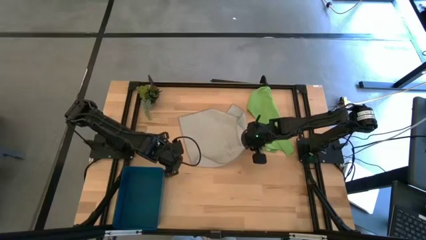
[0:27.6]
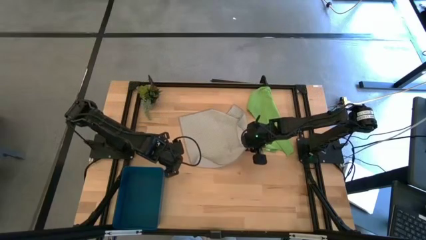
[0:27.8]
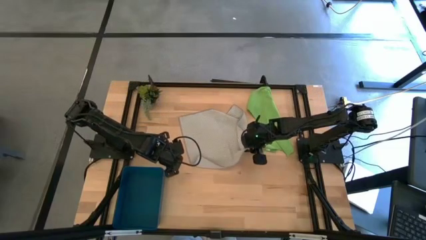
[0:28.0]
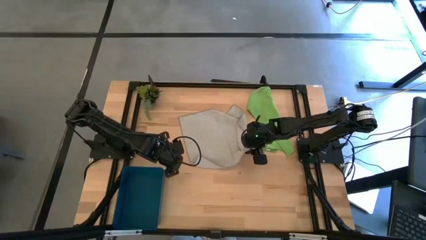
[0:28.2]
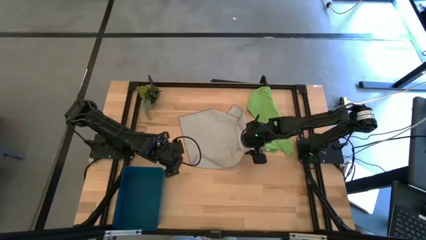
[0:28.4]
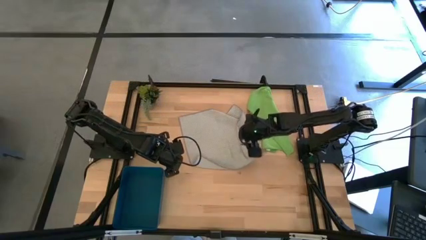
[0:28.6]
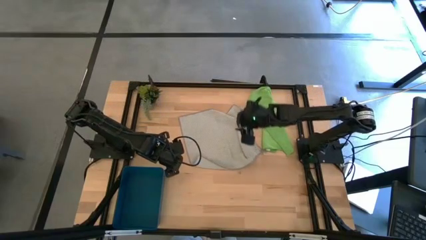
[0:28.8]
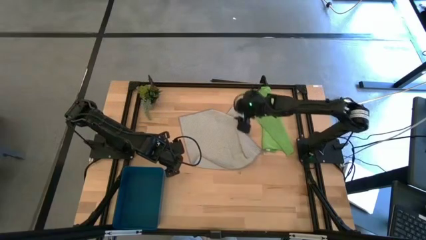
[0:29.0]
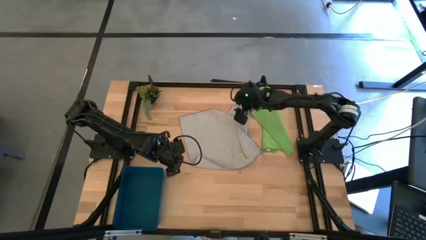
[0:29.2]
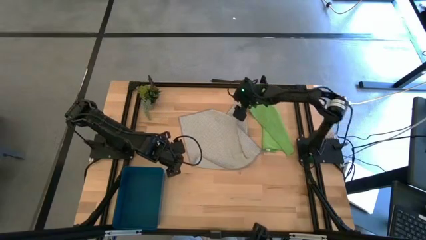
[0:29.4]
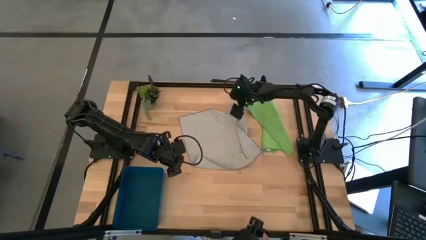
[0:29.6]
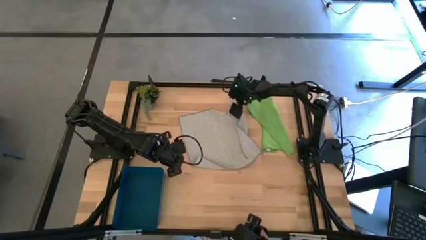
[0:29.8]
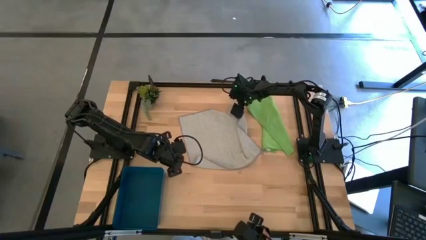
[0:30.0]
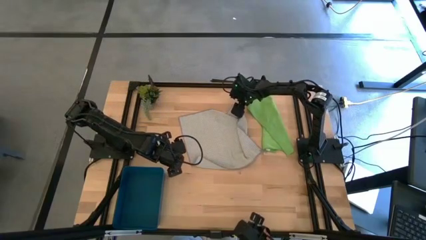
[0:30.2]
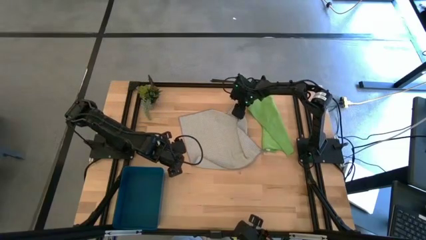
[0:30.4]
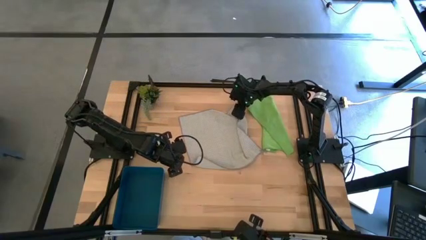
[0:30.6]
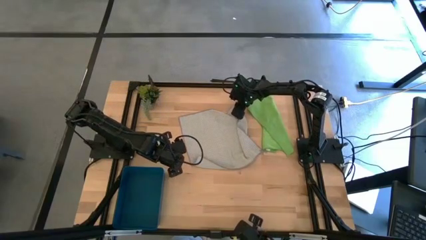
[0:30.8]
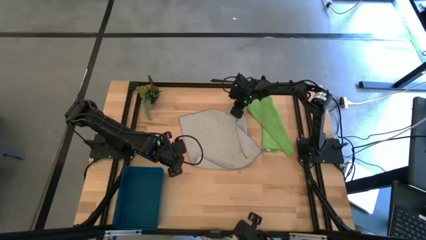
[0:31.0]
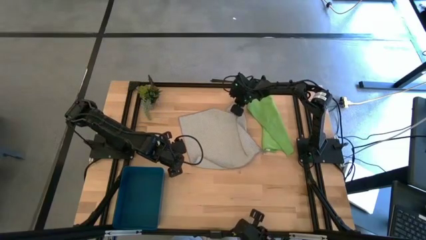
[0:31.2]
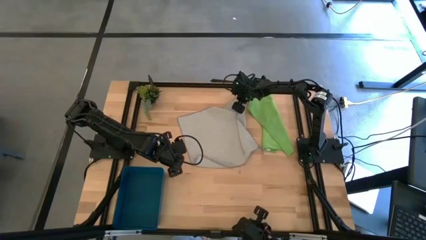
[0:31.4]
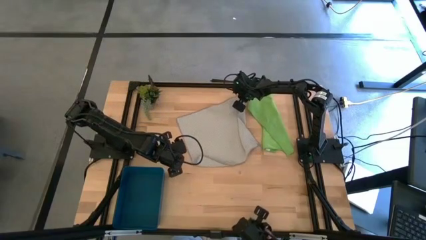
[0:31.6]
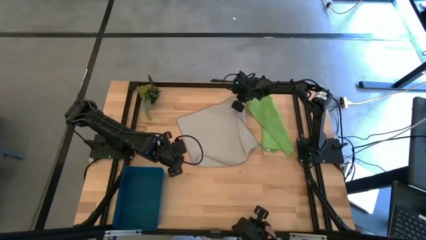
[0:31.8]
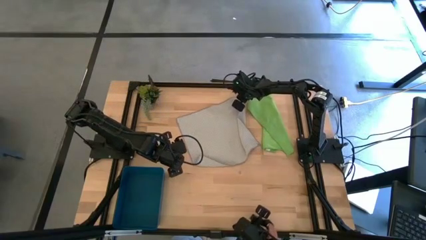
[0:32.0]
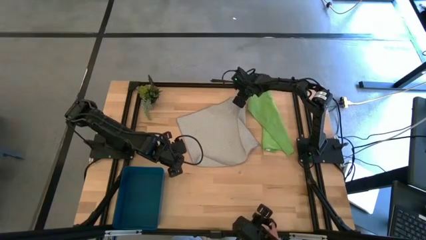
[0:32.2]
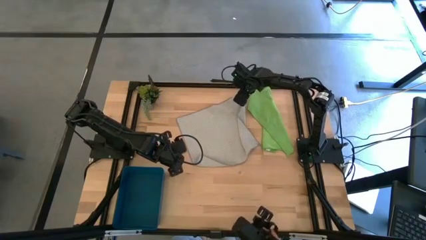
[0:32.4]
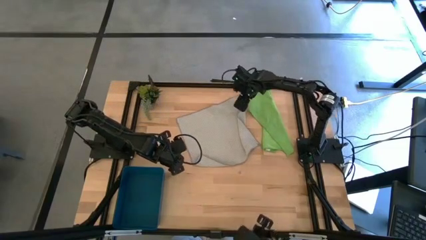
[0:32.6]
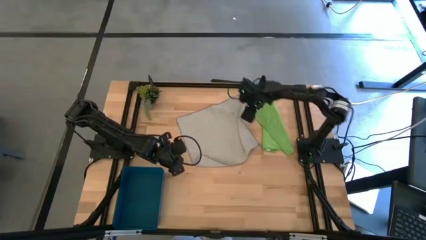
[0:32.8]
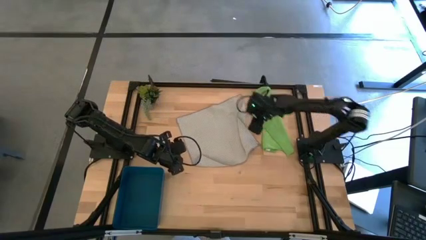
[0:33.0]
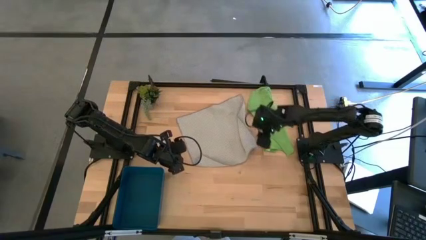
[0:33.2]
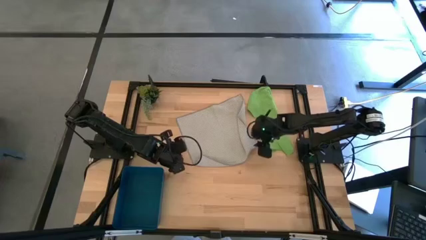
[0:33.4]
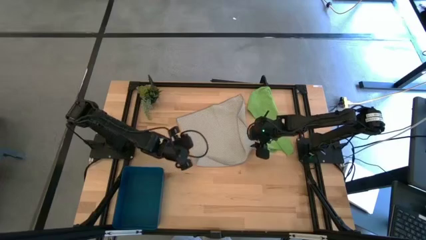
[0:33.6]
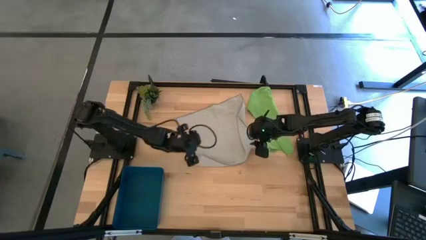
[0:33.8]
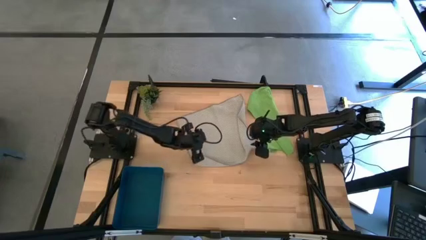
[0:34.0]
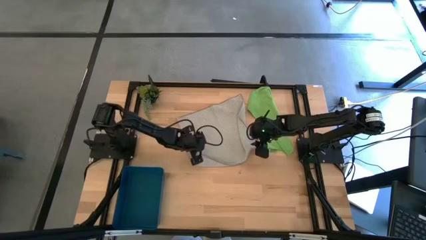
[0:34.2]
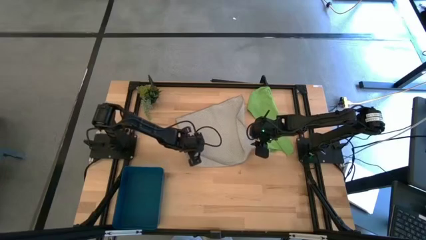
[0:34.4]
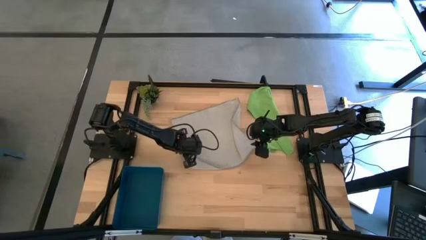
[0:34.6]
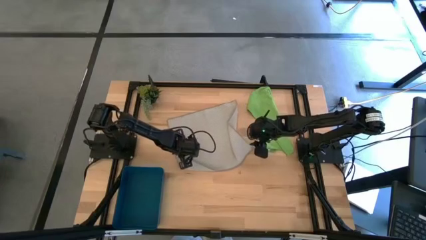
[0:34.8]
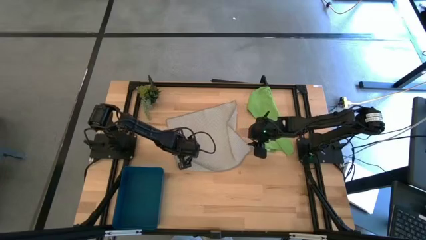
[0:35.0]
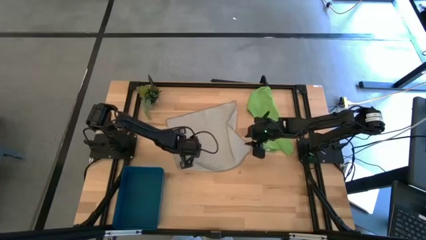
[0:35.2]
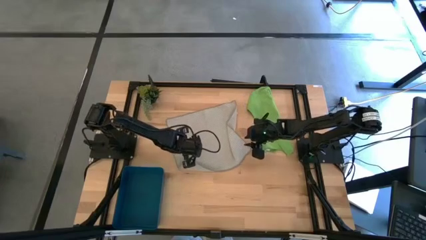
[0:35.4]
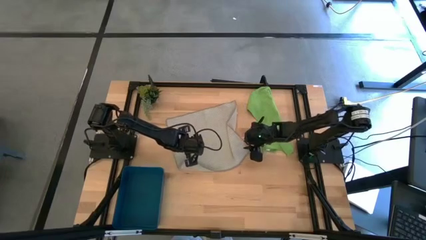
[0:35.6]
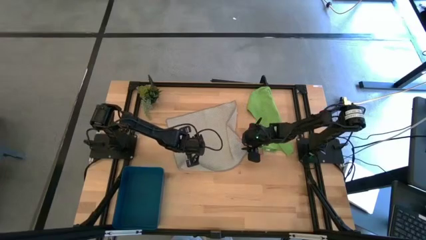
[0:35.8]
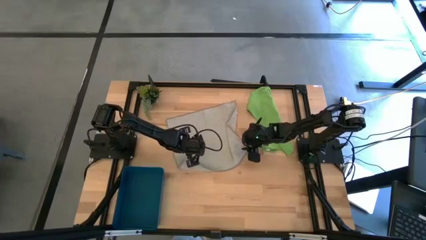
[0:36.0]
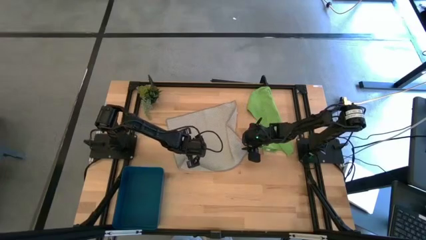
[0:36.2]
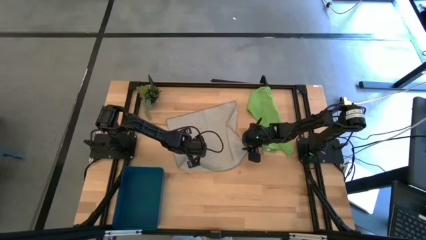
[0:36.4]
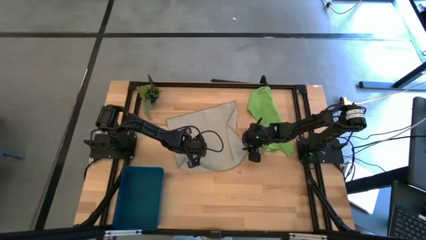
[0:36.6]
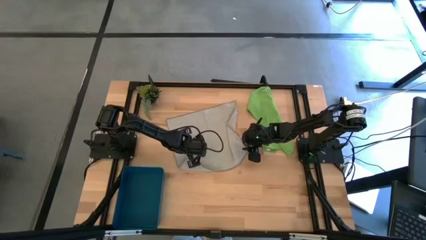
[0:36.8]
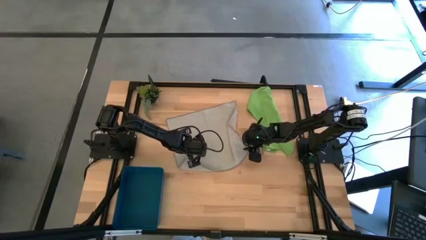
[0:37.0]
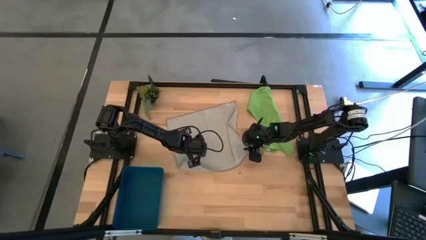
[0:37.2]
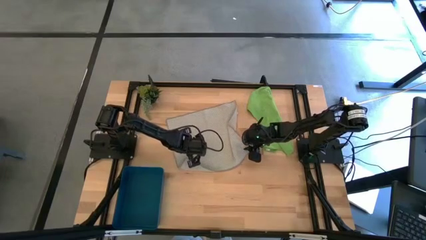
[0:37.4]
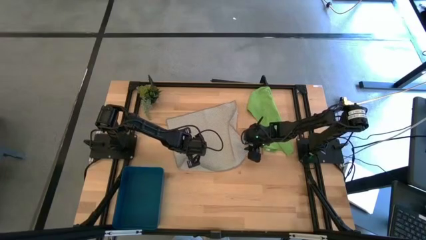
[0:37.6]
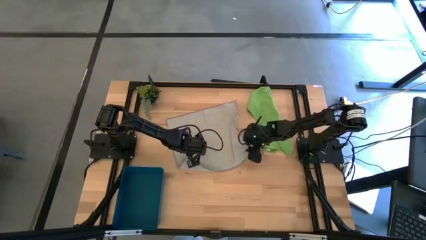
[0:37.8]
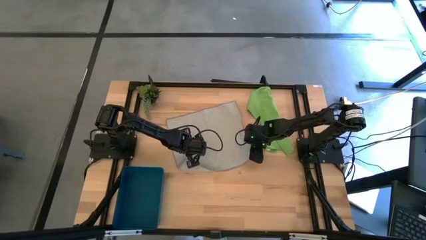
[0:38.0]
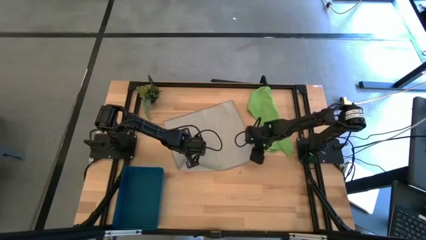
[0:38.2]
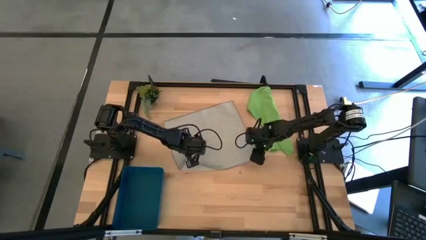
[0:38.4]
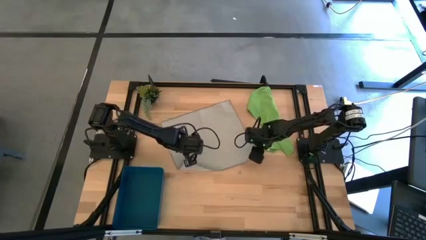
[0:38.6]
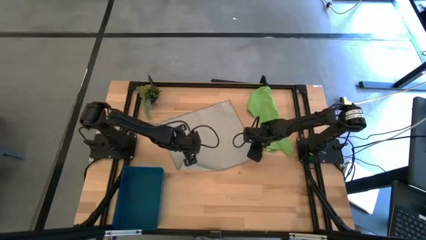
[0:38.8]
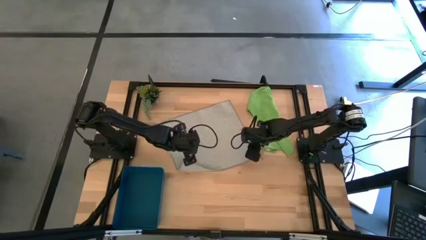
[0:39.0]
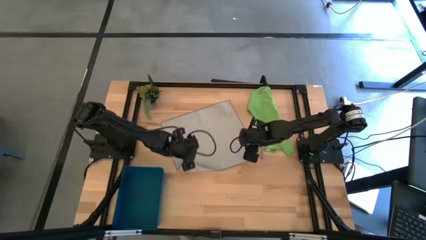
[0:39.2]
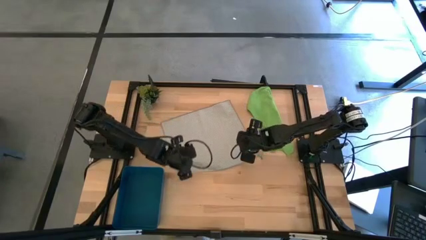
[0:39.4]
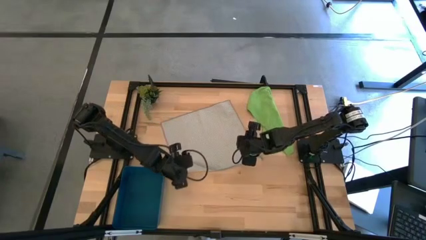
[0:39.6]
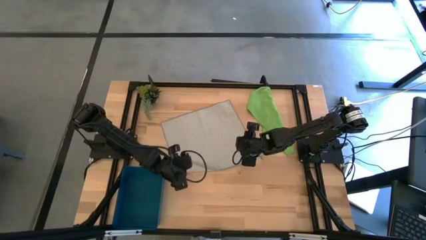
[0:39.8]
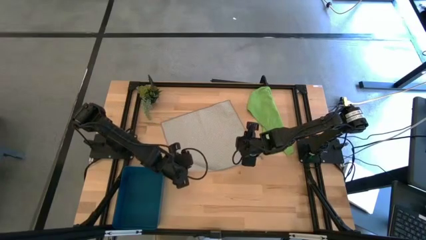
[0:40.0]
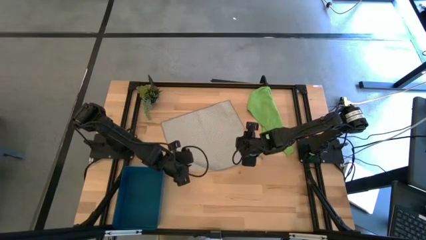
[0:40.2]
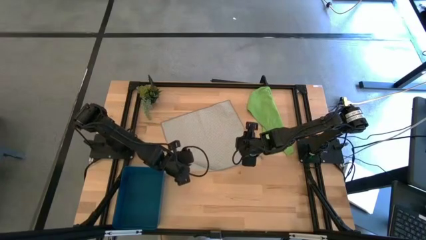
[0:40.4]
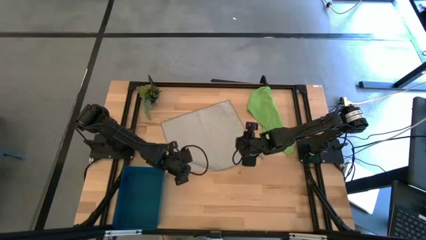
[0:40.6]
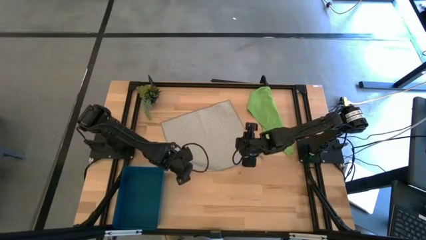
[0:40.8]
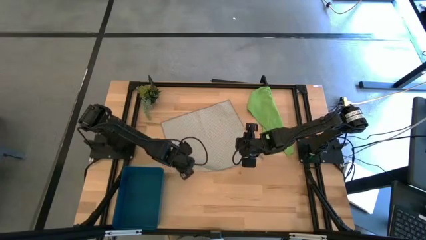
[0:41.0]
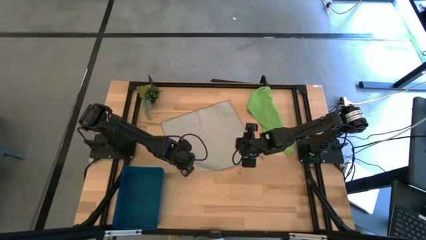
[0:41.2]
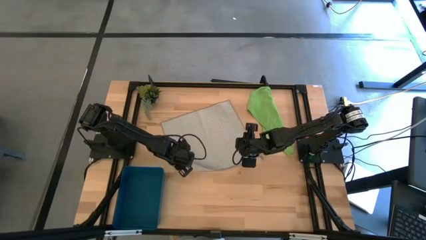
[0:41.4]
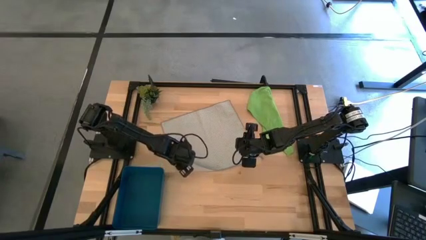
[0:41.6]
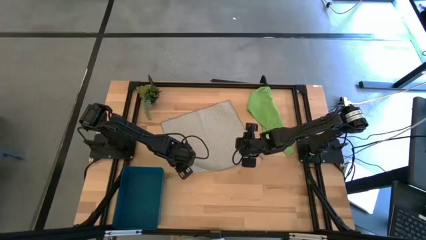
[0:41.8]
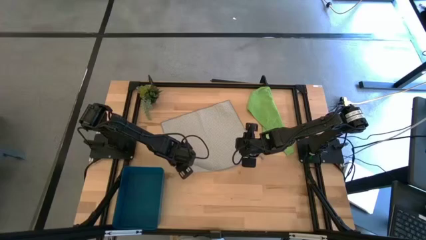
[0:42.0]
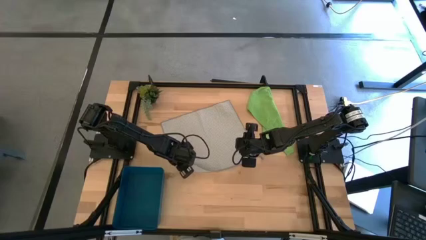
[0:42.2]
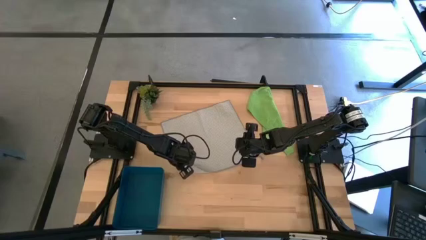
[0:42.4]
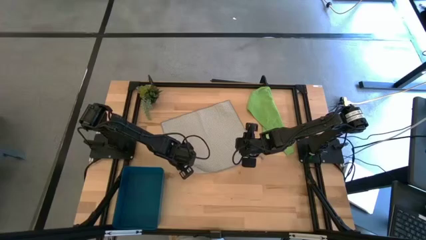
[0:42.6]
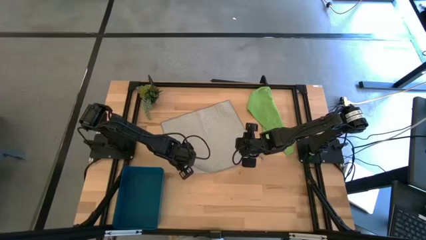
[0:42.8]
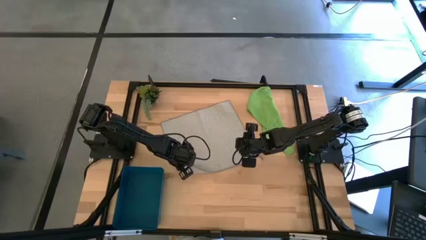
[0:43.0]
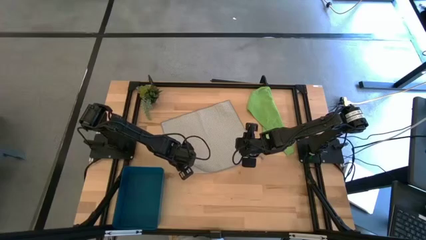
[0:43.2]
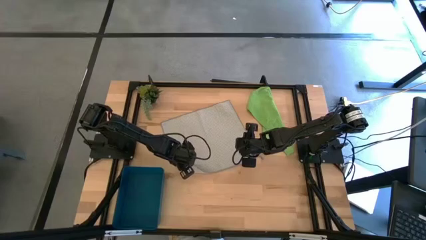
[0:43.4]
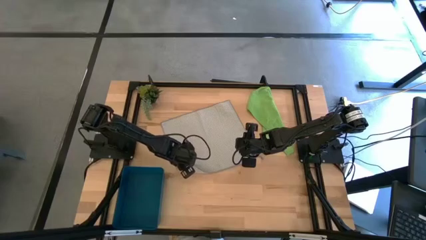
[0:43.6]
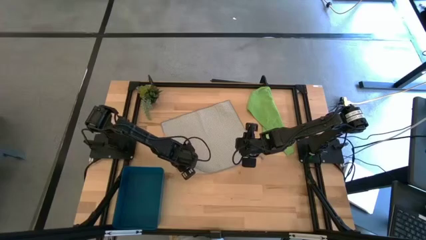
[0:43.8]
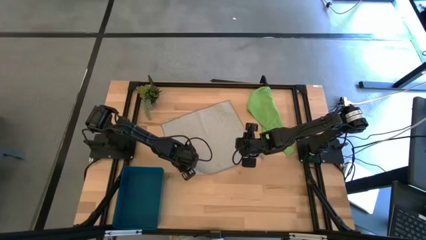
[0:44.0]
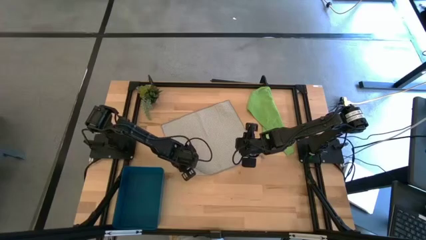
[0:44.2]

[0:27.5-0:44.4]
Task: Roll microfiber towels into tight, uniform cylinder then place into a basket
Roll the gray towel
